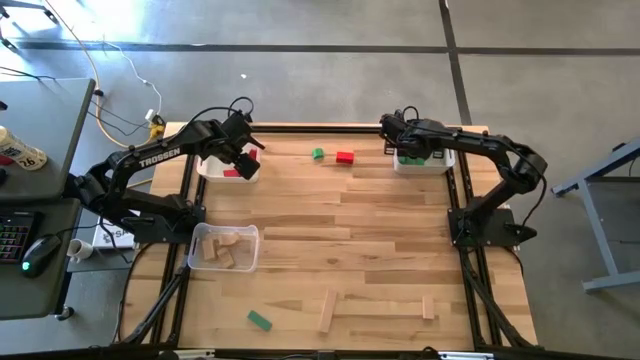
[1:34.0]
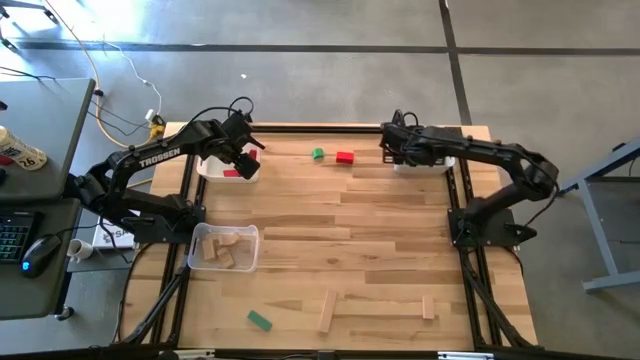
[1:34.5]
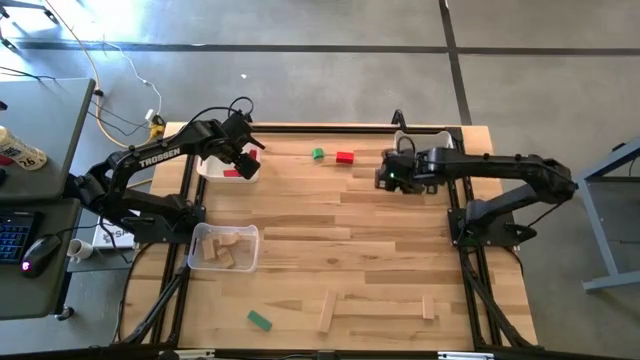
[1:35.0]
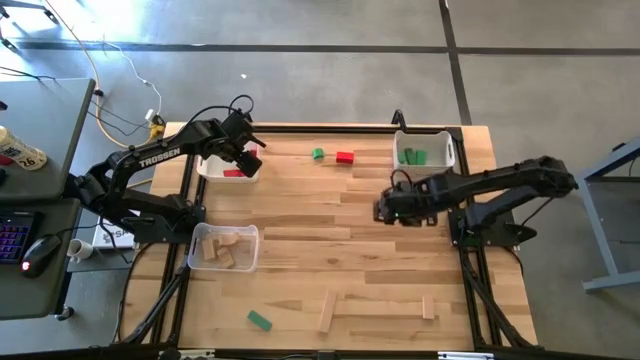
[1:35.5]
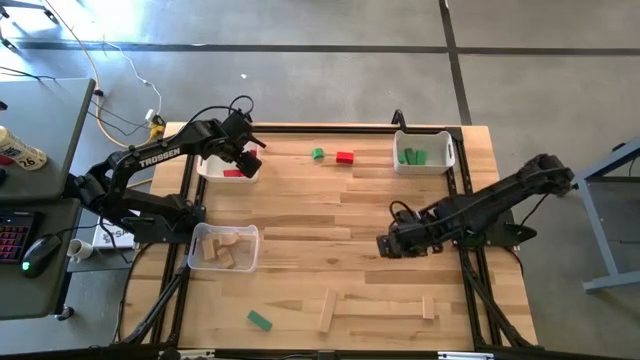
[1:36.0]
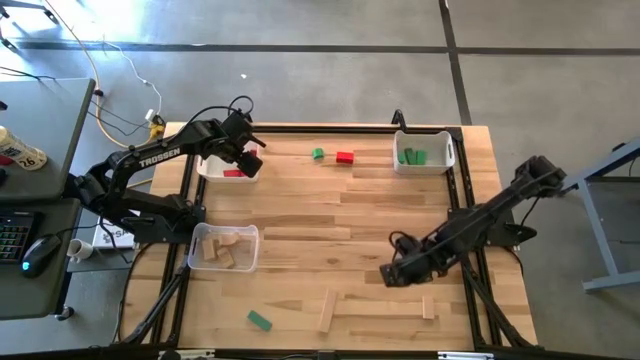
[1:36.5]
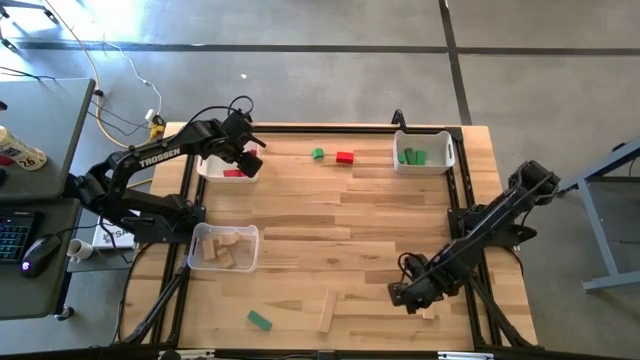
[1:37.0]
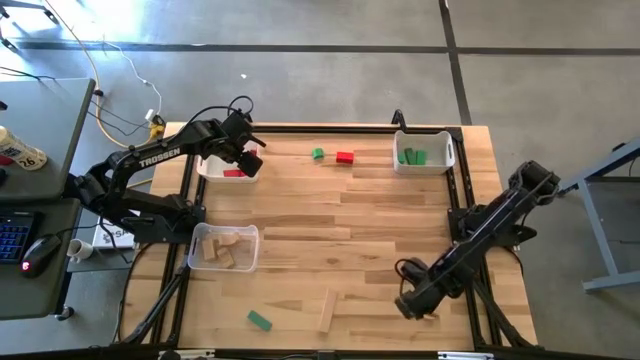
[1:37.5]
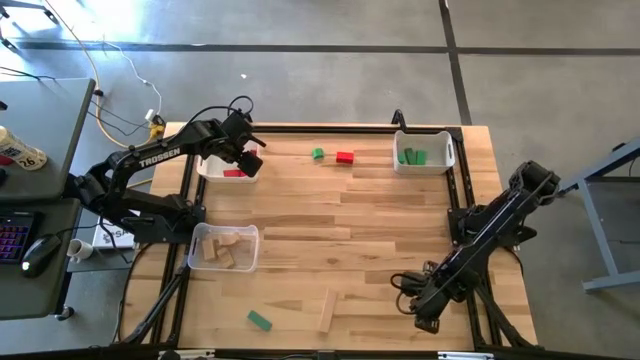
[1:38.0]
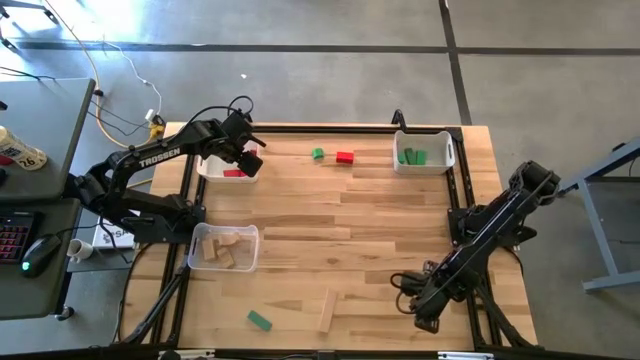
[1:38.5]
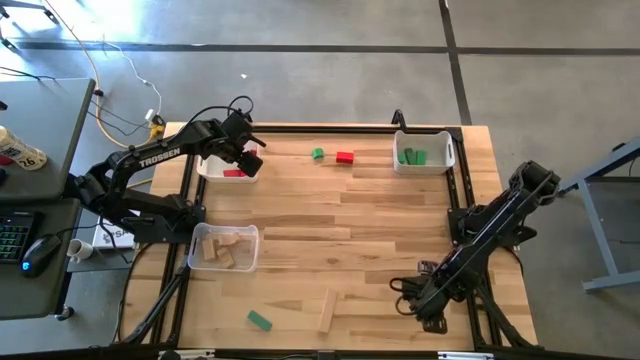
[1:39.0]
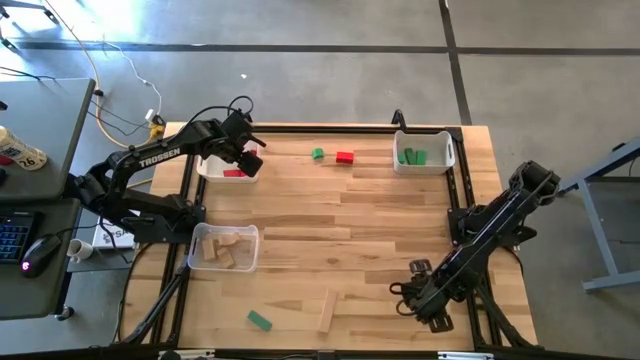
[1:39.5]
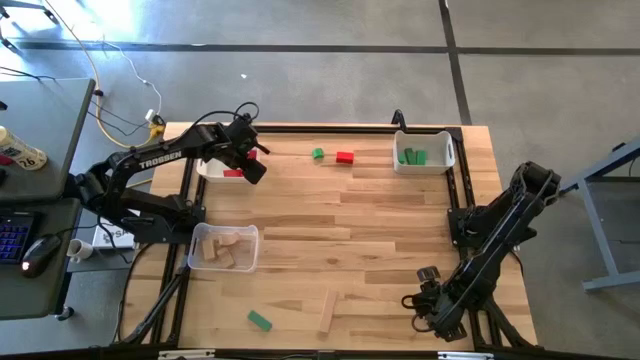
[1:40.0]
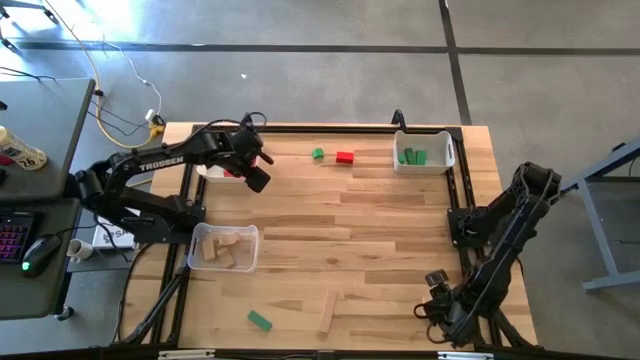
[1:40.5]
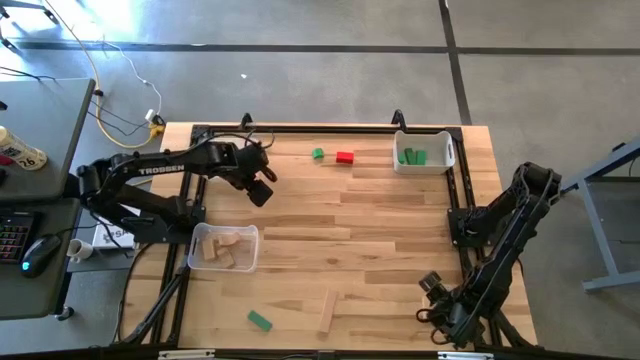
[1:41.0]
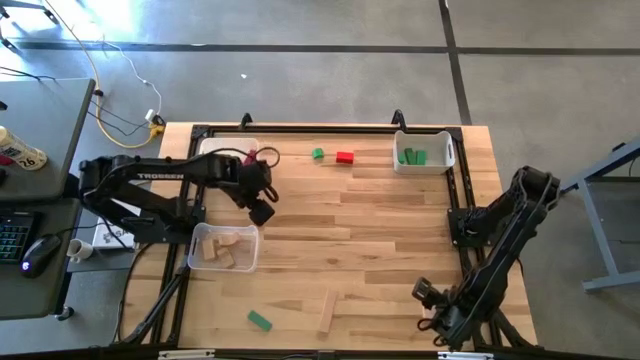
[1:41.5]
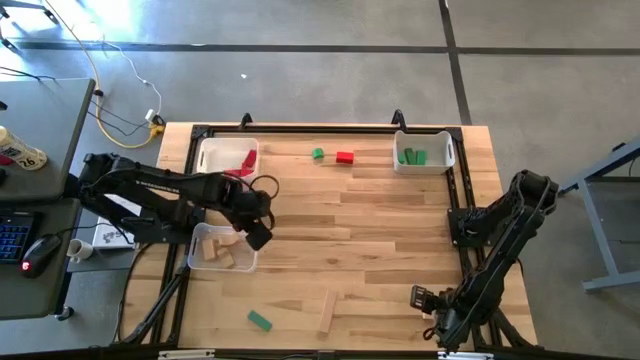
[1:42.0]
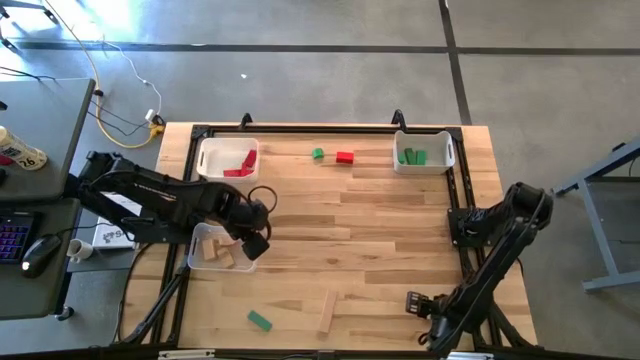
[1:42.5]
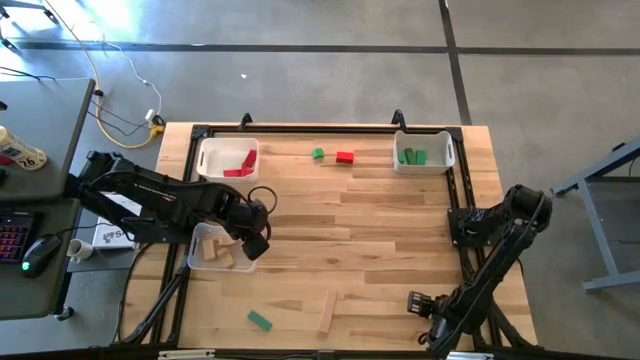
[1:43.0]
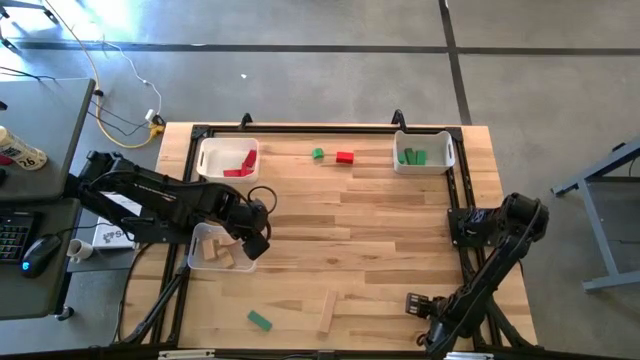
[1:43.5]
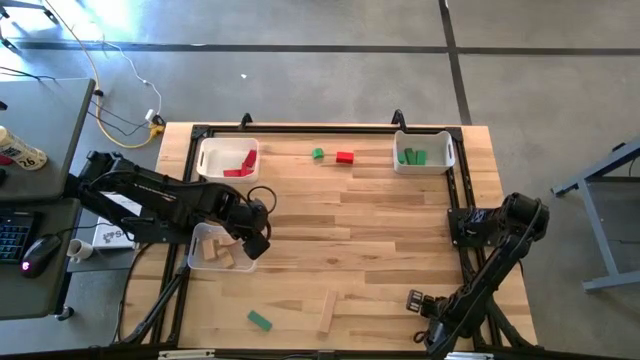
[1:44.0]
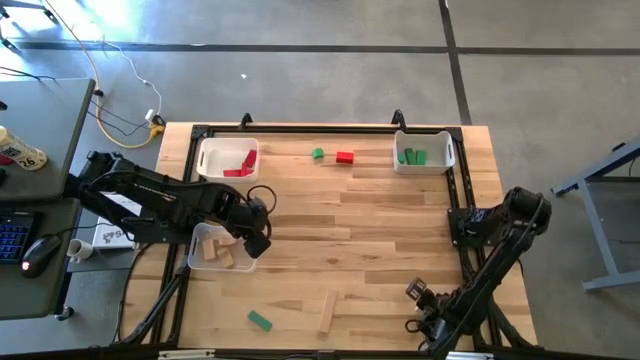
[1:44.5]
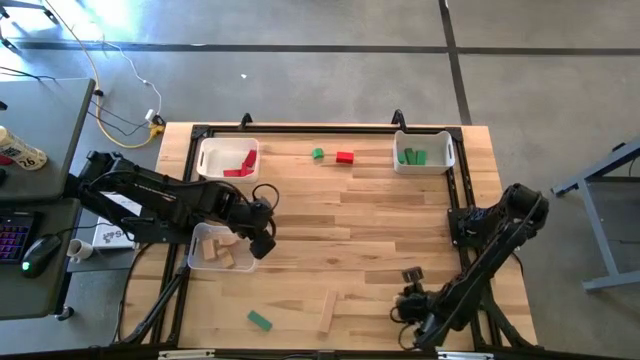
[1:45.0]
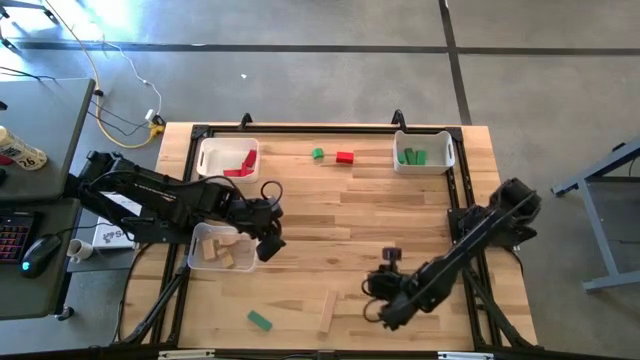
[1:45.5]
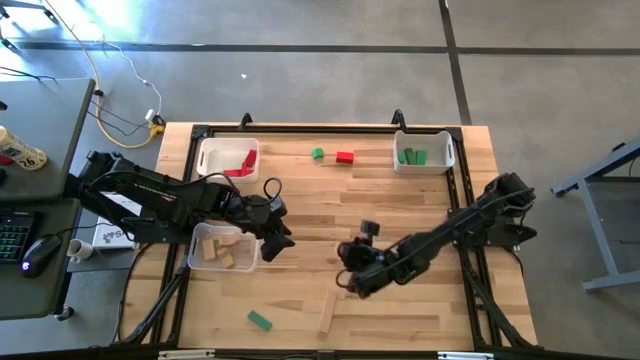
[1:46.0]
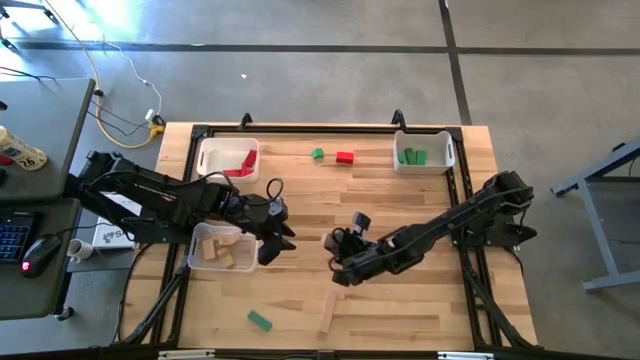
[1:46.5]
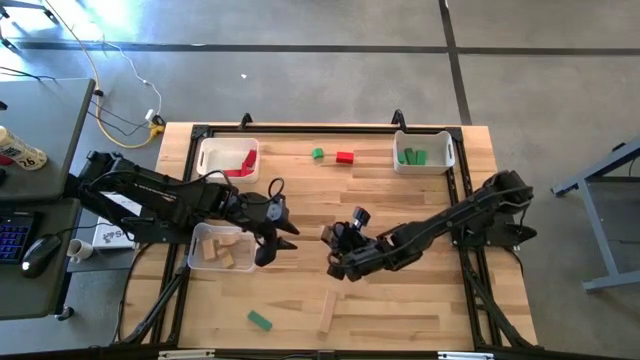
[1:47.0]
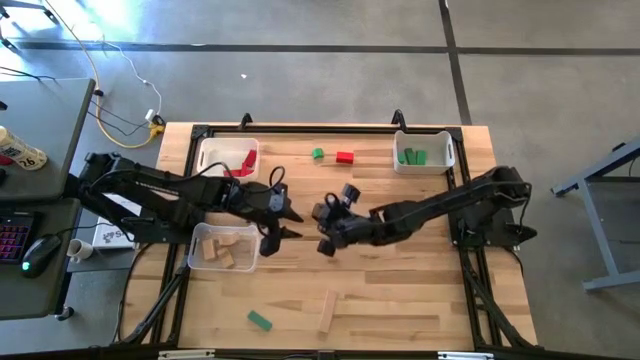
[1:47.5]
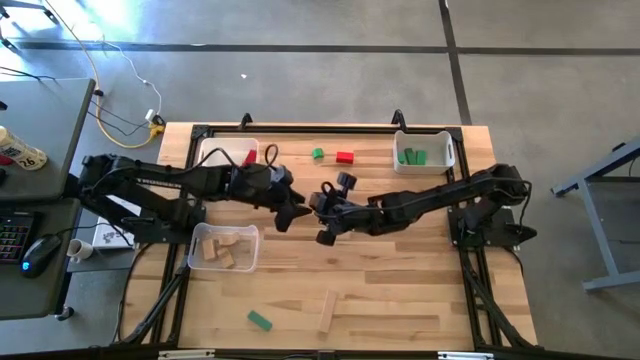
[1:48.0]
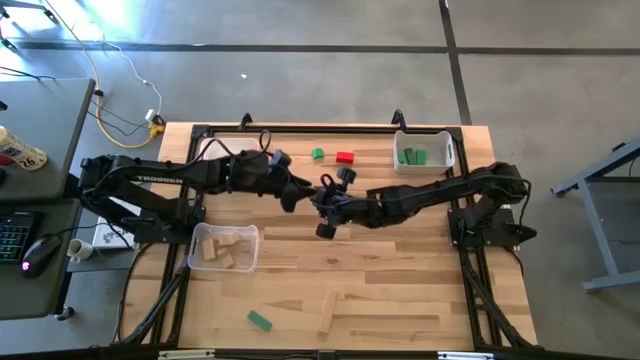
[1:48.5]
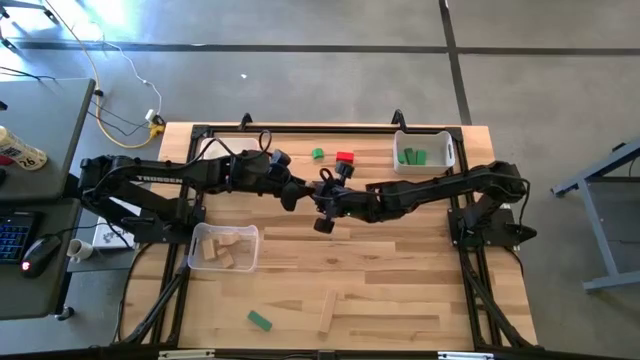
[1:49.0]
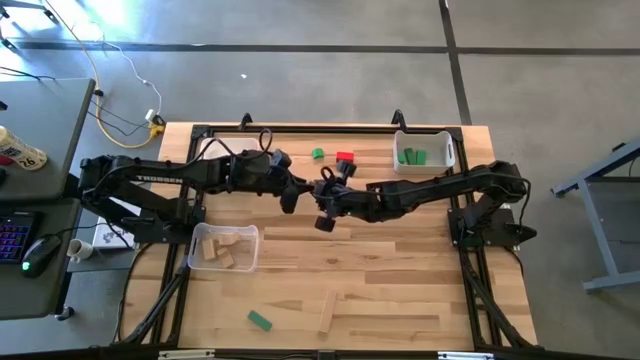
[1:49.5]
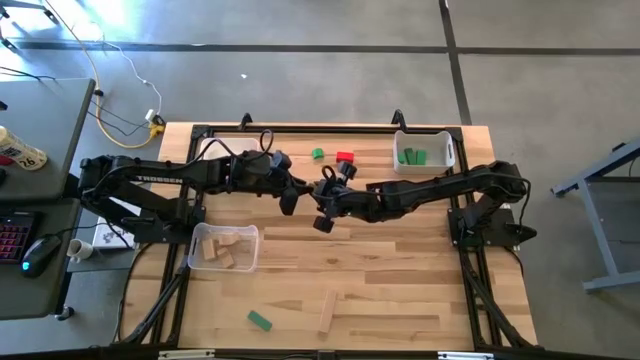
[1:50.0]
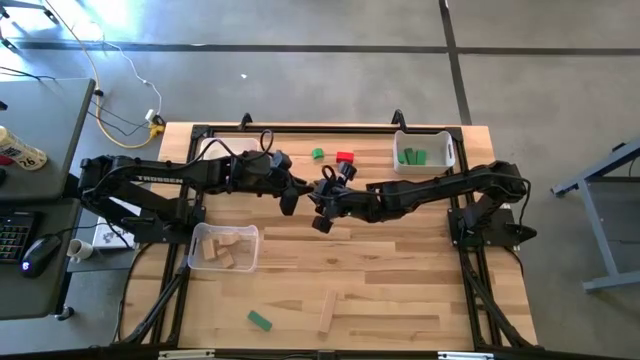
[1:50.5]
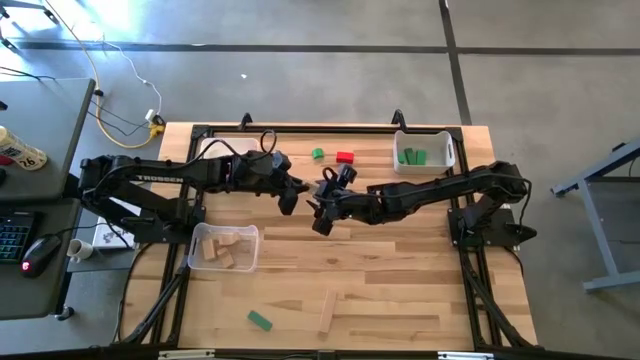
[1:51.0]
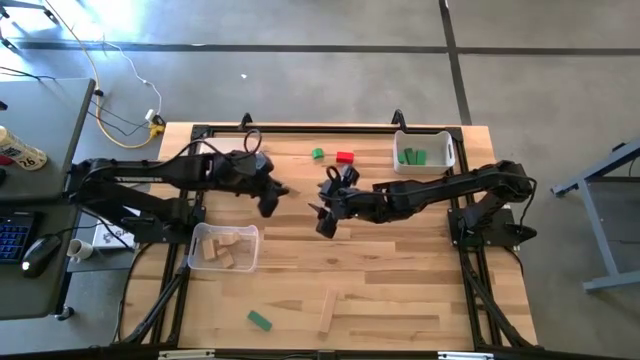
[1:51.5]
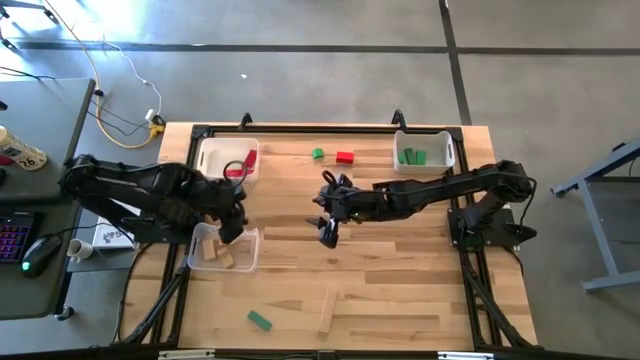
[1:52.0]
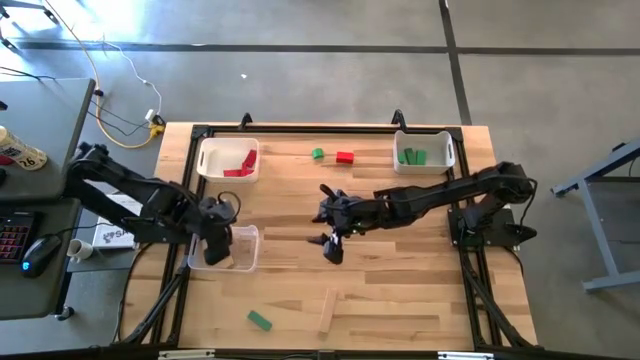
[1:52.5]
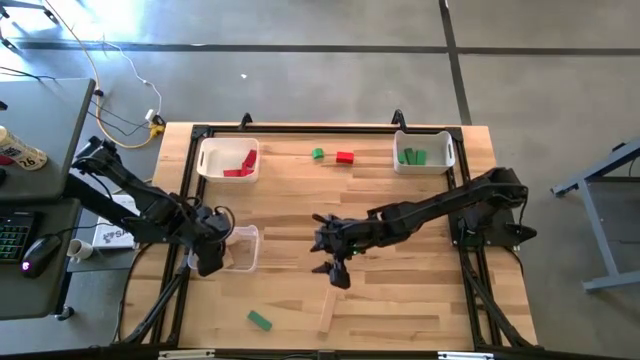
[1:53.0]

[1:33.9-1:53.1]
Task: Sort & place blocks by color
Put the cream rectangle into the transparent bin
